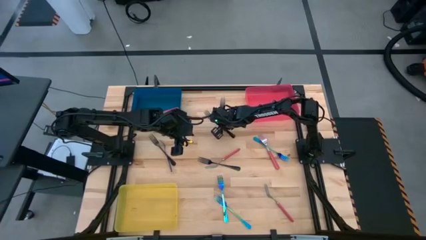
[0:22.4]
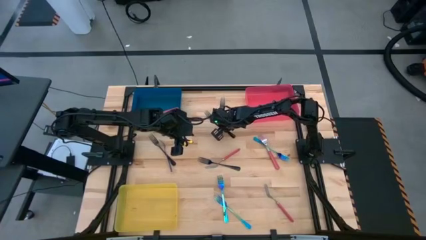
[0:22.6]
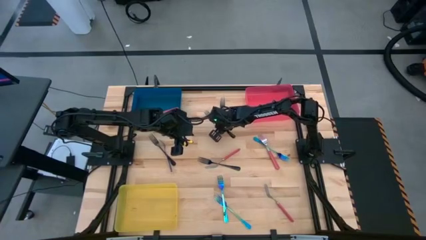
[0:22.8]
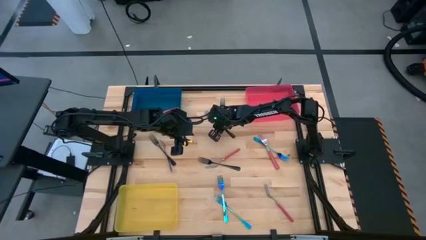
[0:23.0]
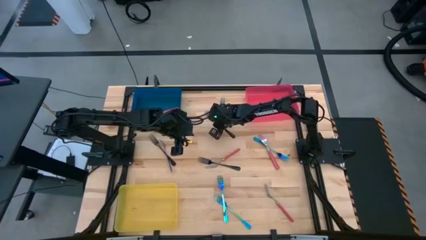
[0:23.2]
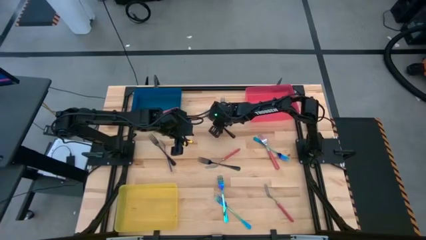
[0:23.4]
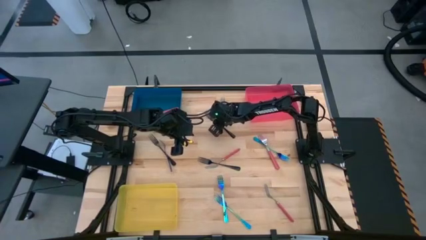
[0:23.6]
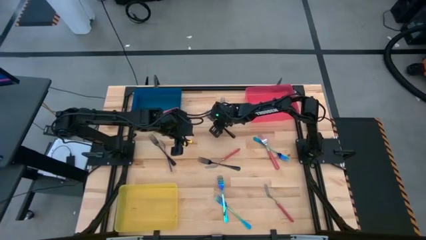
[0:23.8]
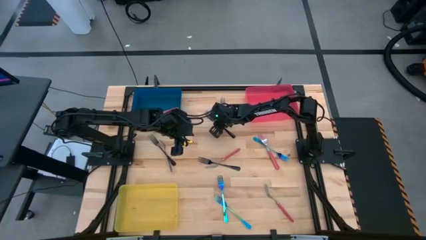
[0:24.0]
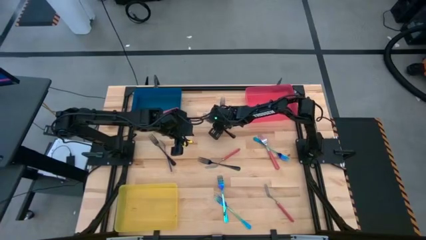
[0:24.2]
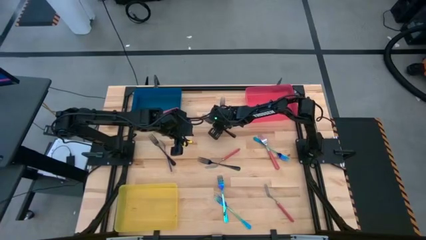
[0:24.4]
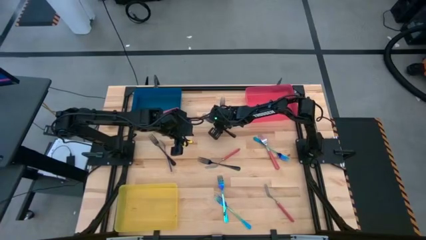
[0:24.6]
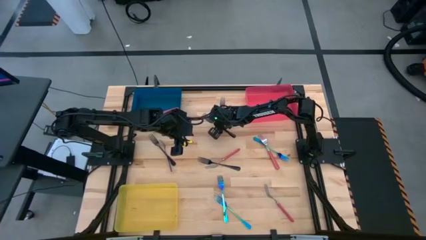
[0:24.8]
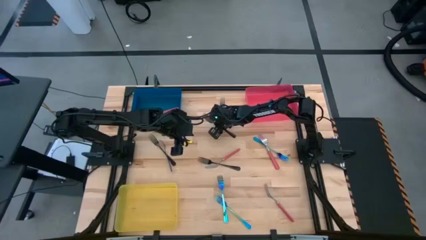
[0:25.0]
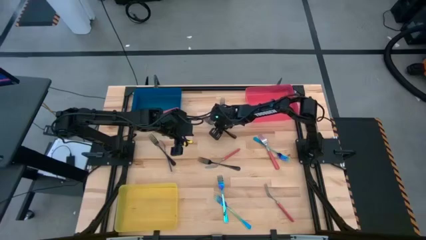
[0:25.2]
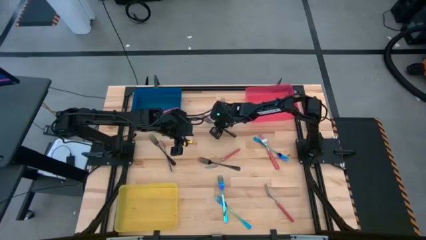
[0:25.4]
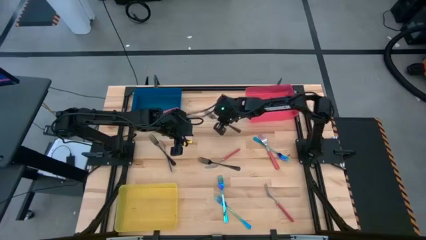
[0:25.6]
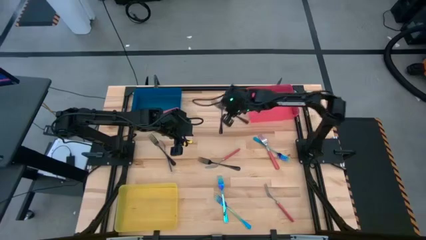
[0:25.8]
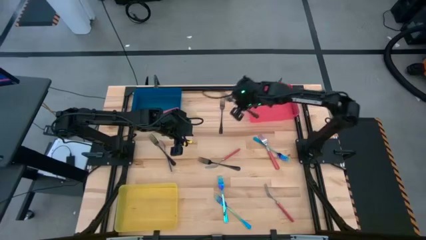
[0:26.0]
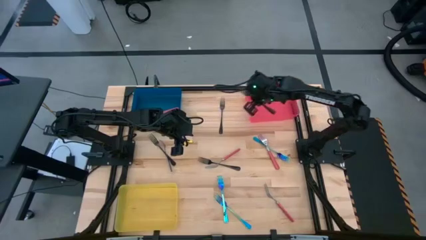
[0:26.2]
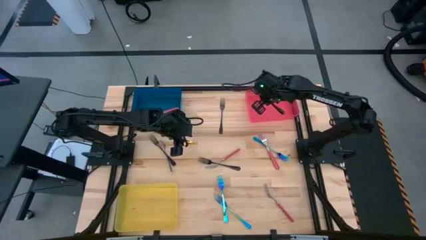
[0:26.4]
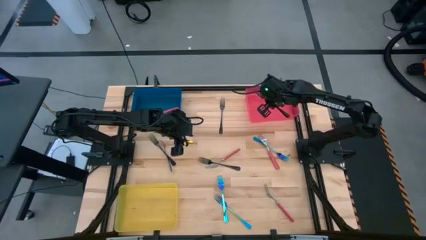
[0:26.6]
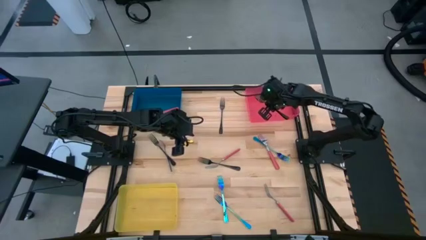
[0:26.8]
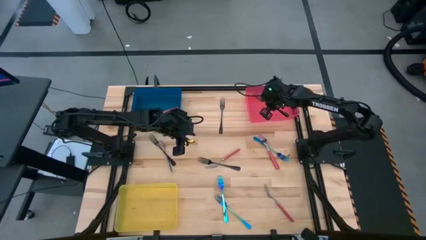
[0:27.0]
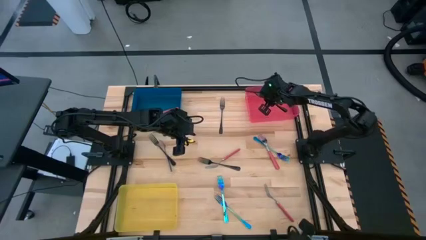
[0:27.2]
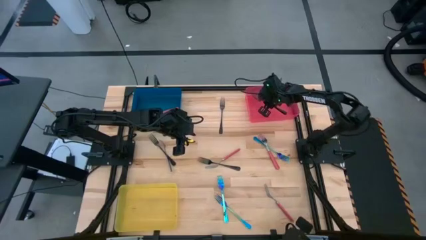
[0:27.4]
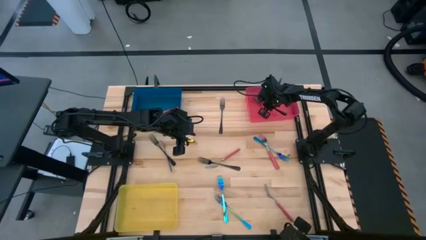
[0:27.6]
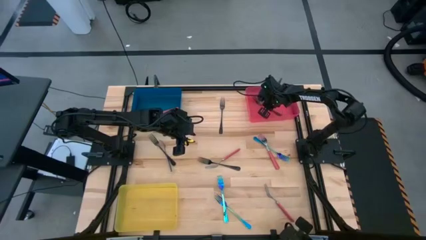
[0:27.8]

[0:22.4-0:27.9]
Task: Sort silverware by color (type)
Put the black fork into the red bin

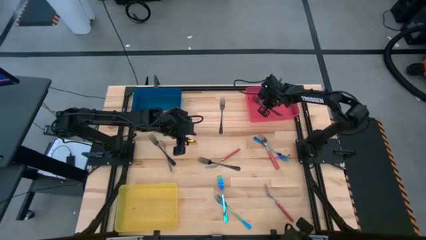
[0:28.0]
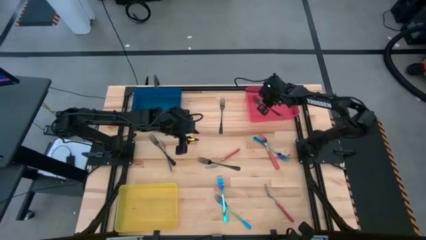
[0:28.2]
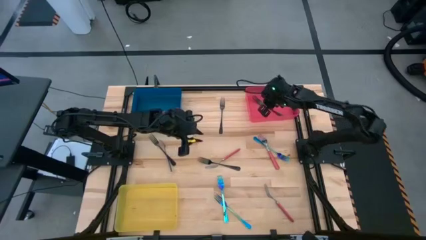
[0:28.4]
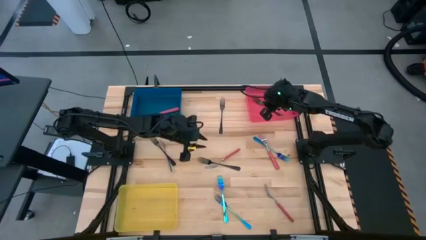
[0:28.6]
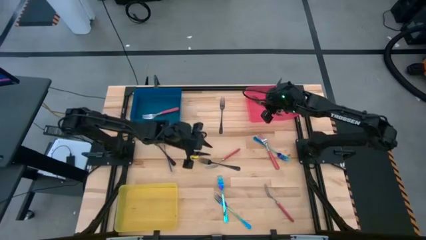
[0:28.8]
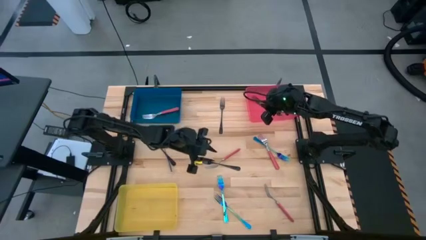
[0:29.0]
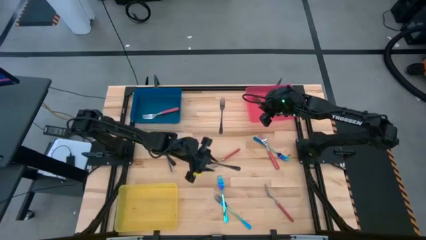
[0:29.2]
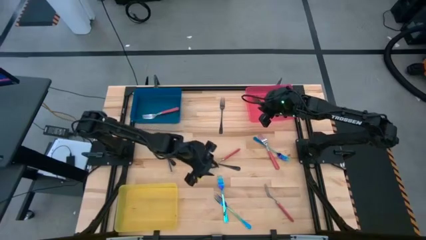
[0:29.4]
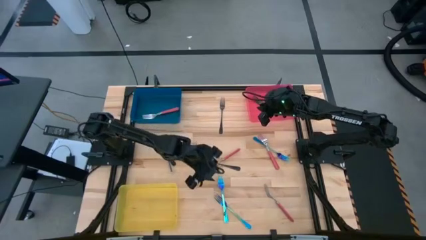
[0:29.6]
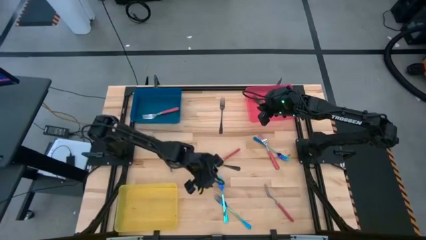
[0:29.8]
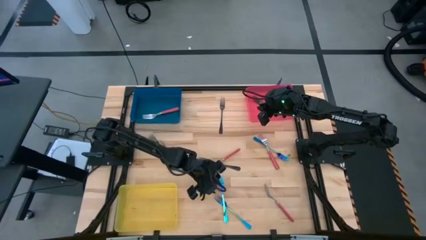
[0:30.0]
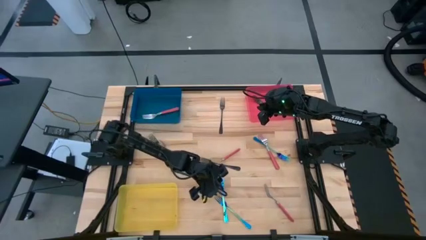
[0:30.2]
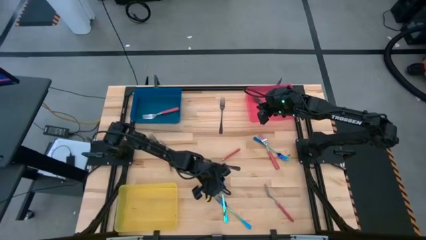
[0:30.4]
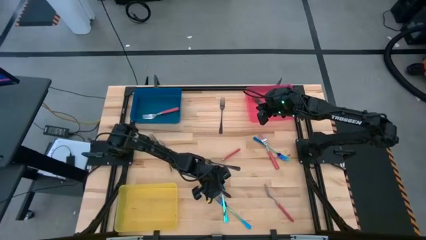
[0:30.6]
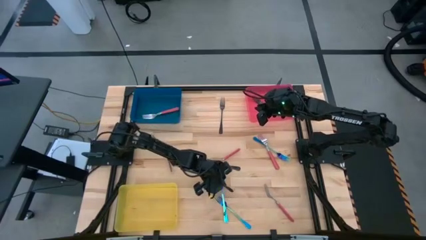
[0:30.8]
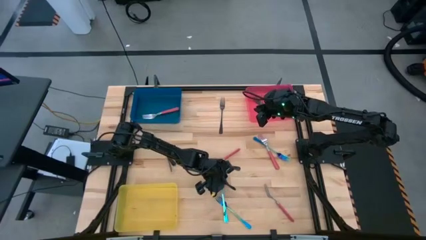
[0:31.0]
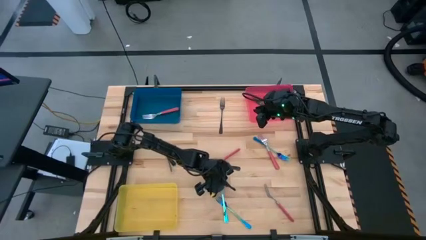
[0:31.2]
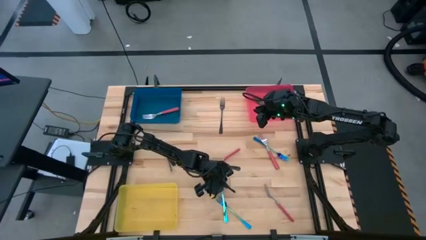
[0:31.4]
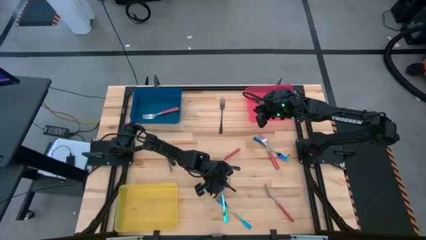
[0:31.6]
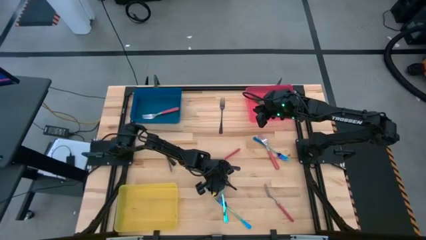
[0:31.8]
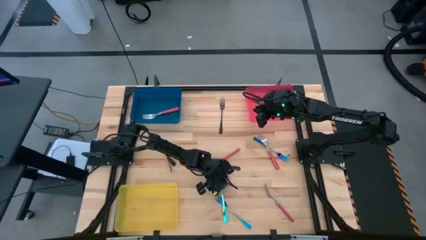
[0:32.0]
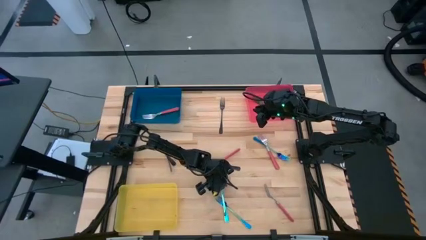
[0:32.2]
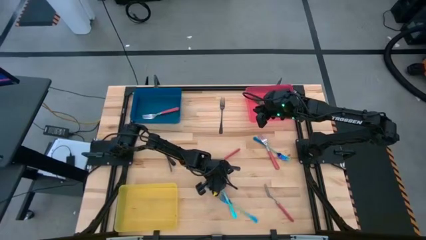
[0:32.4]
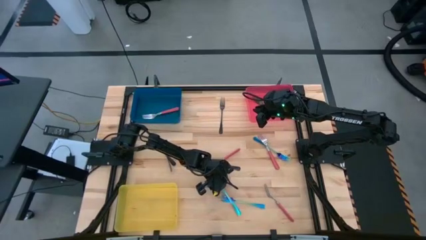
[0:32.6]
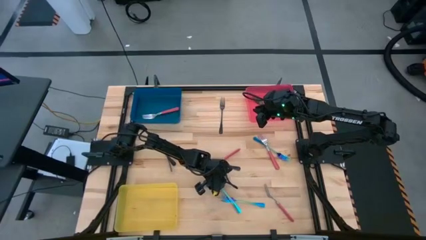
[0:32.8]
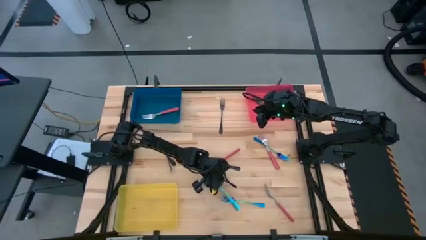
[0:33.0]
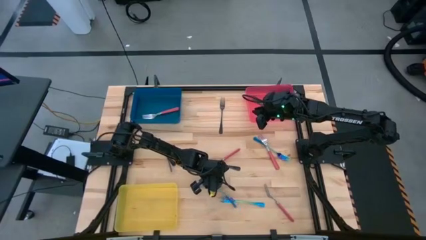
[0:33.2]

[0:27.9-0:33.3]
Put the blue fork into the yellow bin

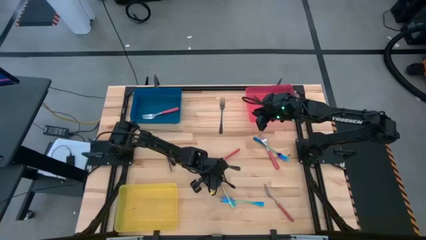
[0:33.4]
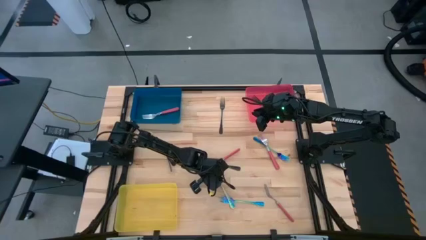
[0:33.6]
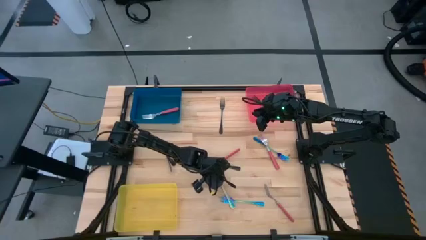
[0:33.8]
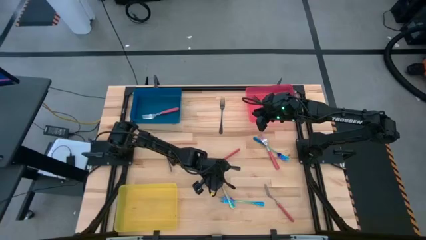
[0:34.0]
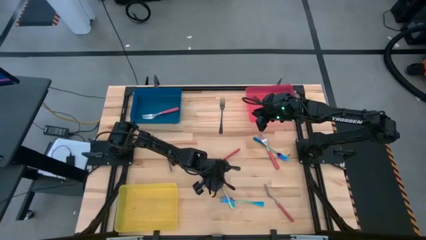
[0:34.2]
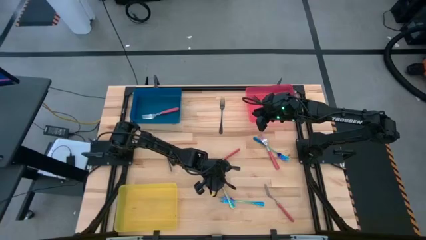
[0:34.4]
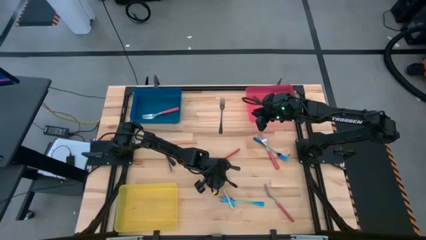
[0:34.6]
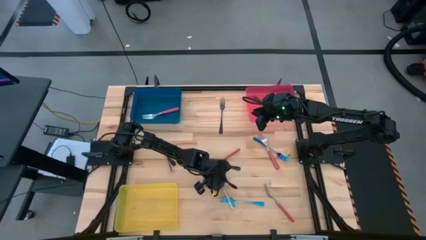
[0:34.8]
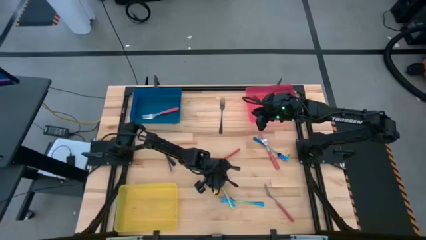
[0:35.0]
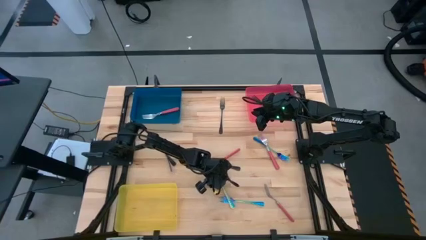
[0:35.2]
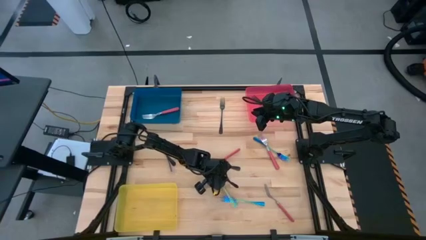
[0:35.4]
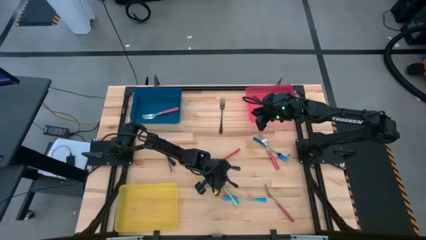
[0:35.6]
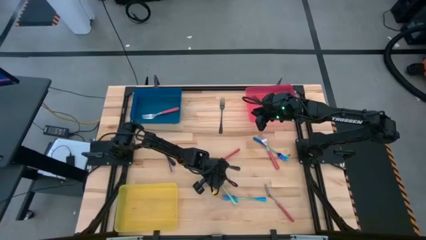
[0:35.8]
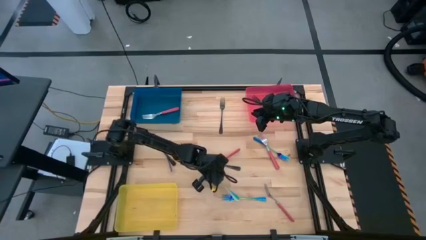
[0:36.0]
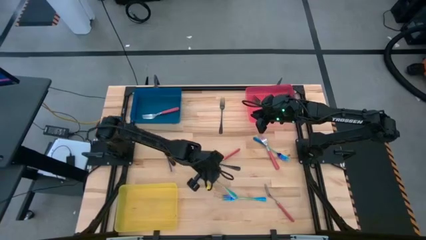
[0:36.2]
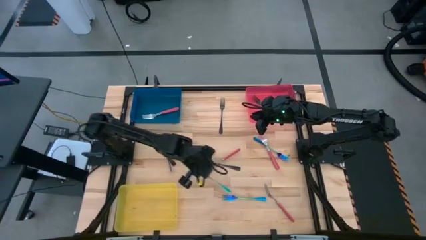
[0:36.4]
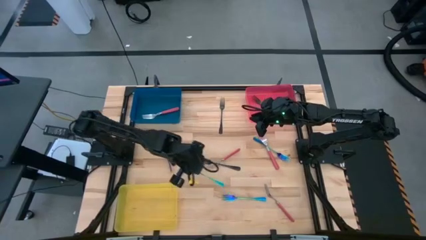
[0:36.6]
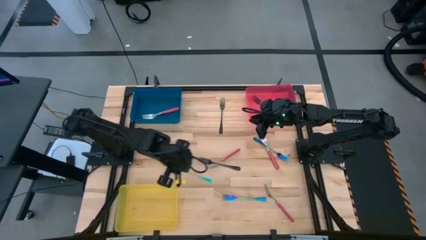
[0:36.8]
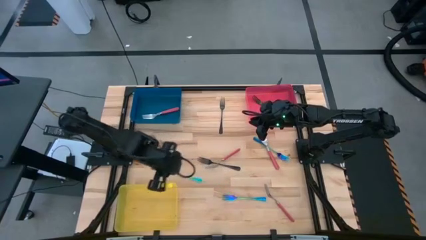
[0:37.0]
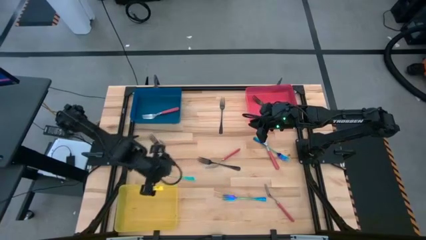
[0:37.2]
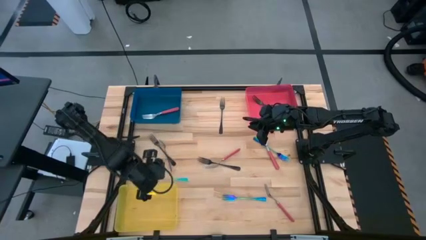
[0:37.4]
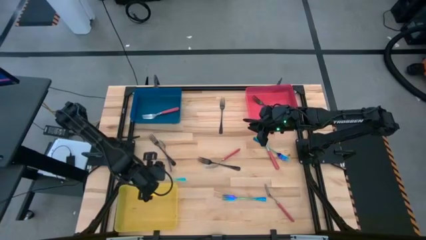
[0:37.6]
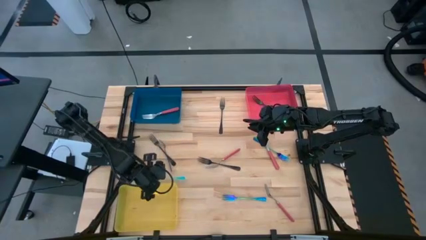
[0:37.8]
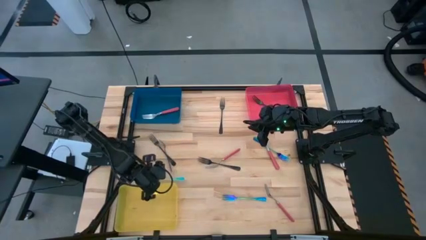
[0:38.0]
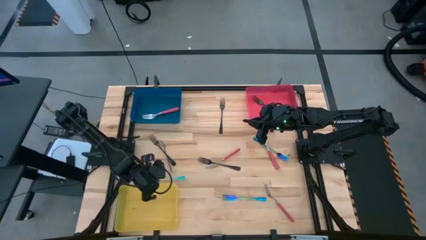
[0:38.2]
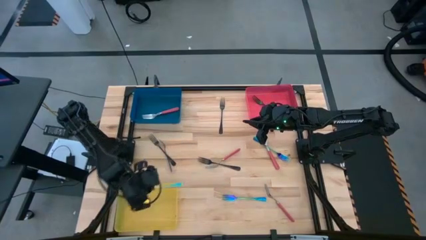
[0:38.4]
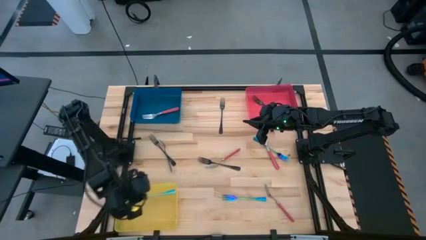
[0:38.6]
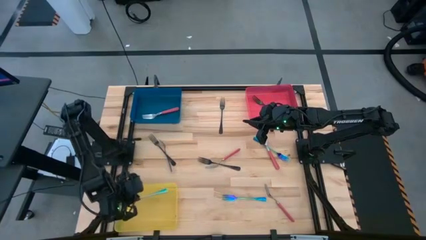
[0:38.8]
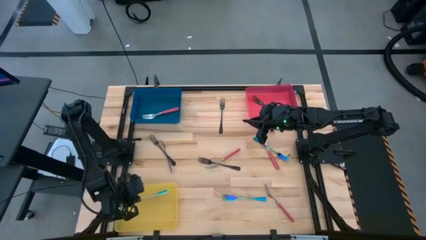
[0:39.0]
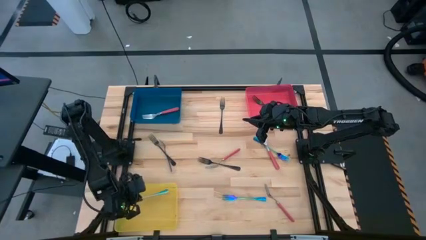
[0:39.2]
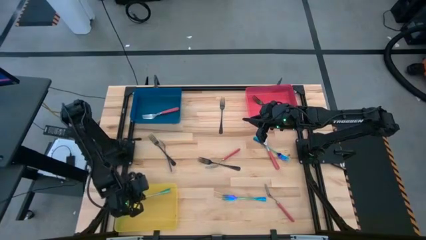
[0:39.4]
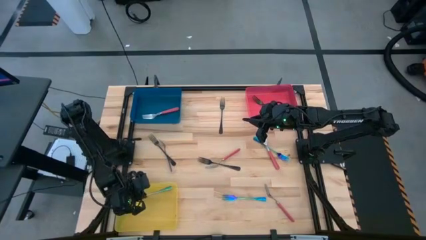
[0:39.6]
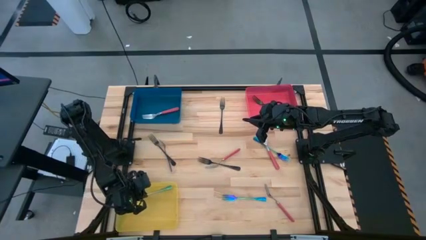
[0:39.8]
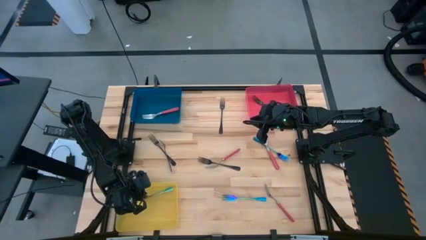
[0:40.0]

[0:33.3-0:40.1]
Put the blue fork into the yellow bin
